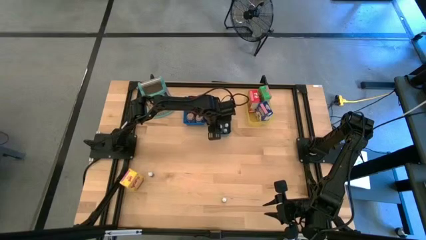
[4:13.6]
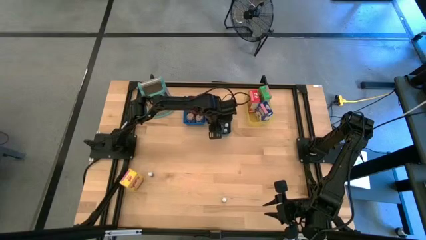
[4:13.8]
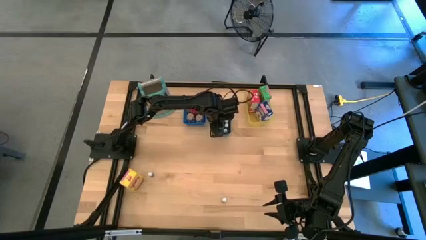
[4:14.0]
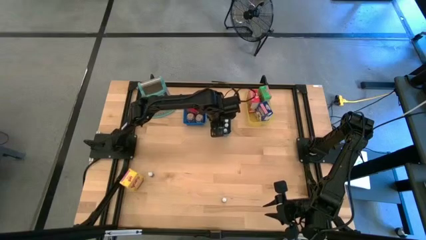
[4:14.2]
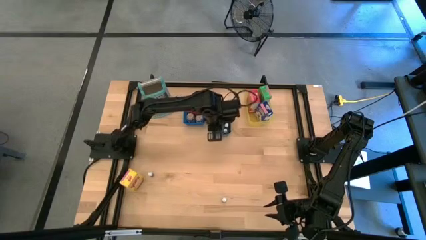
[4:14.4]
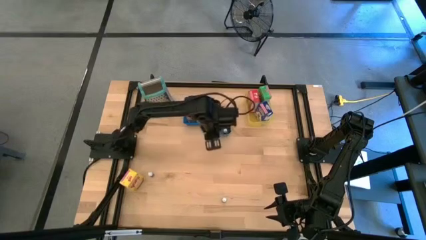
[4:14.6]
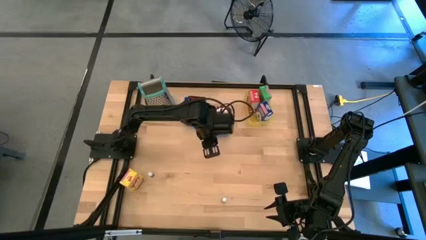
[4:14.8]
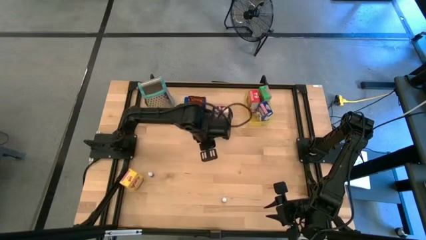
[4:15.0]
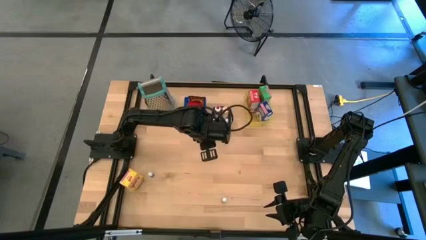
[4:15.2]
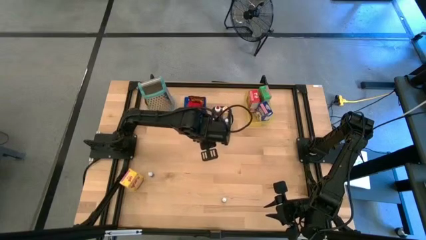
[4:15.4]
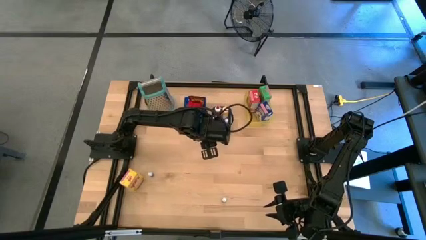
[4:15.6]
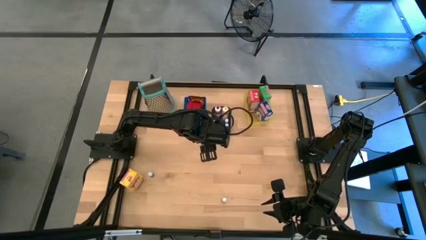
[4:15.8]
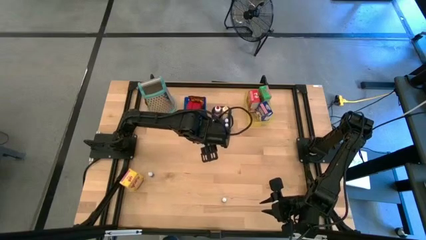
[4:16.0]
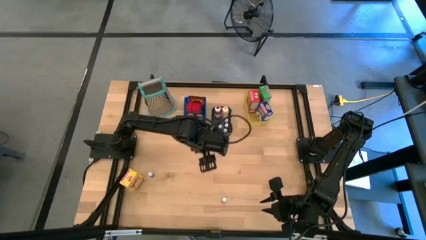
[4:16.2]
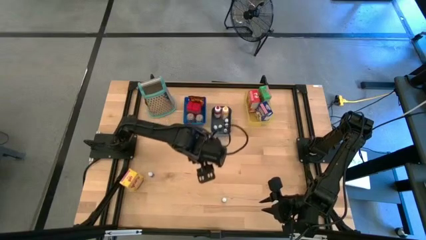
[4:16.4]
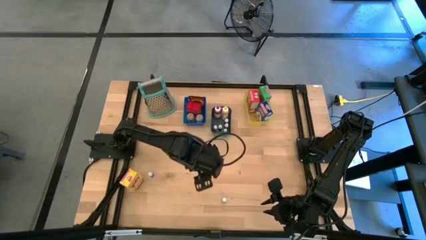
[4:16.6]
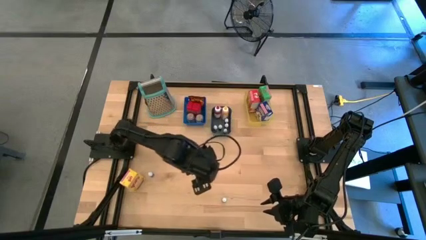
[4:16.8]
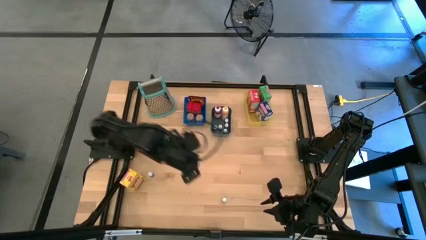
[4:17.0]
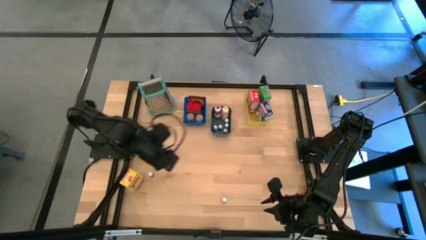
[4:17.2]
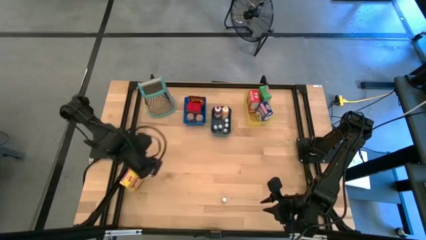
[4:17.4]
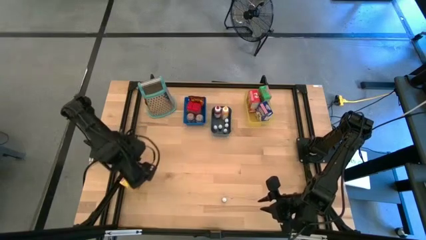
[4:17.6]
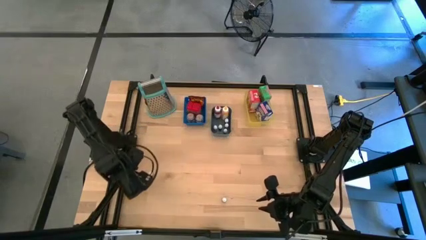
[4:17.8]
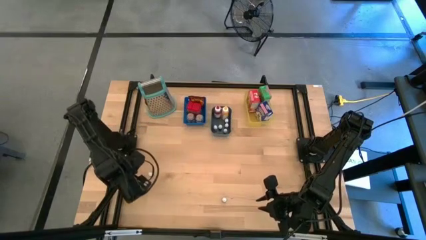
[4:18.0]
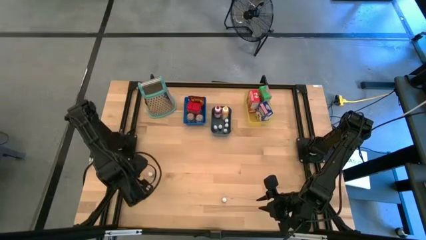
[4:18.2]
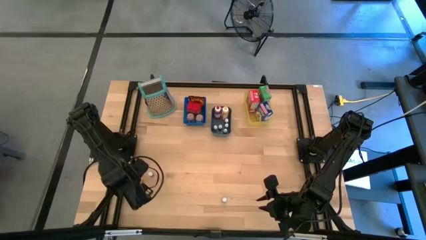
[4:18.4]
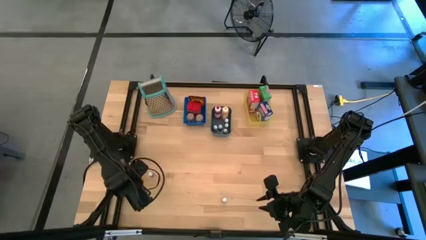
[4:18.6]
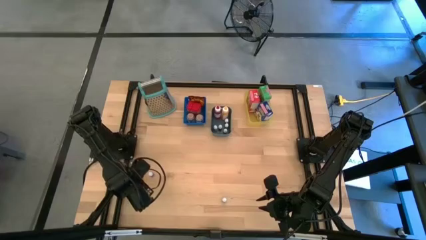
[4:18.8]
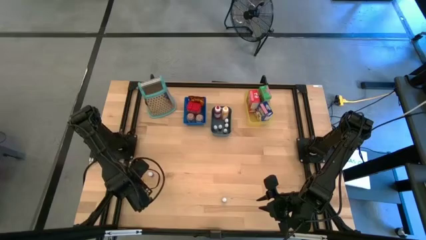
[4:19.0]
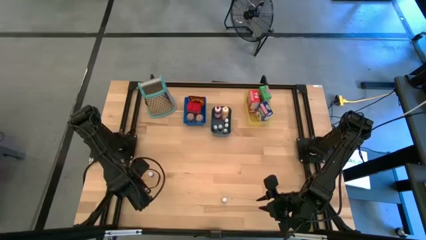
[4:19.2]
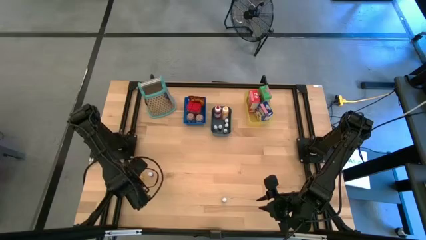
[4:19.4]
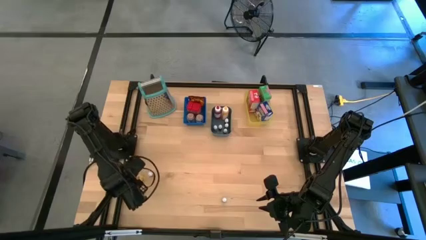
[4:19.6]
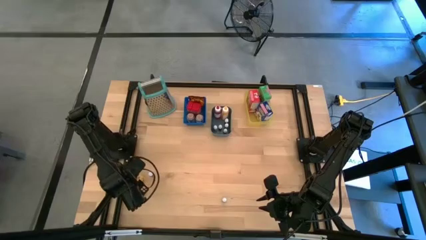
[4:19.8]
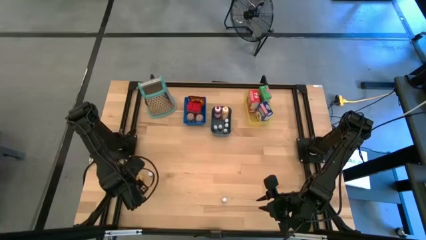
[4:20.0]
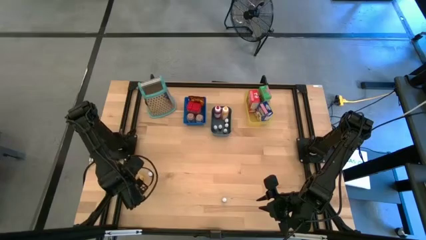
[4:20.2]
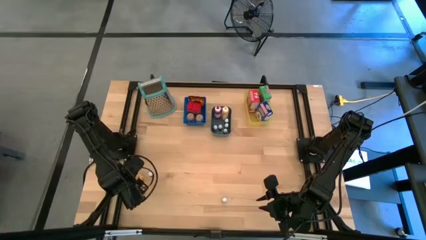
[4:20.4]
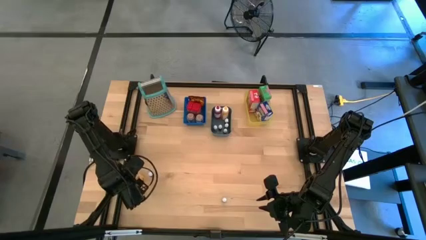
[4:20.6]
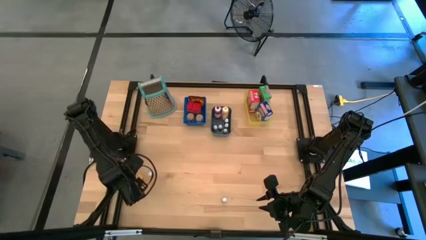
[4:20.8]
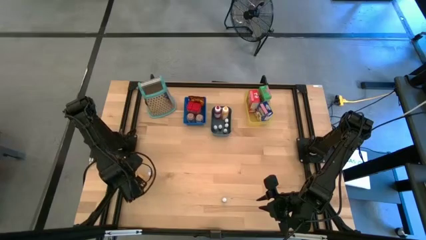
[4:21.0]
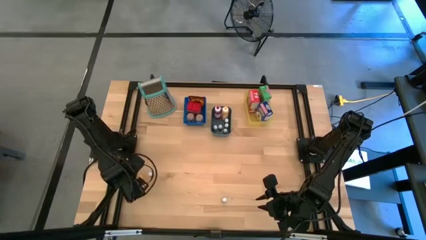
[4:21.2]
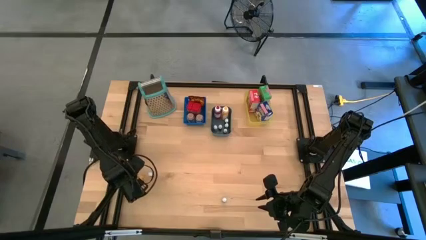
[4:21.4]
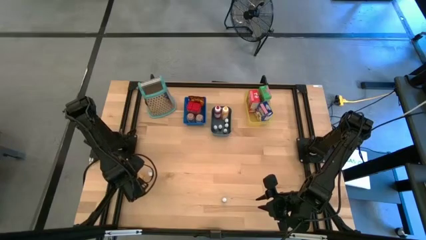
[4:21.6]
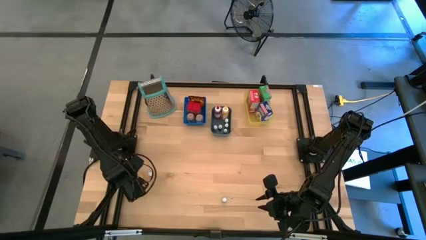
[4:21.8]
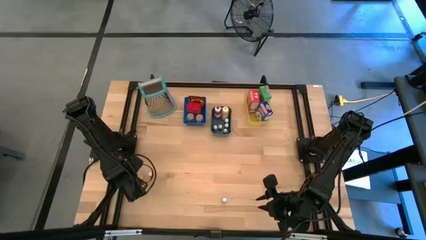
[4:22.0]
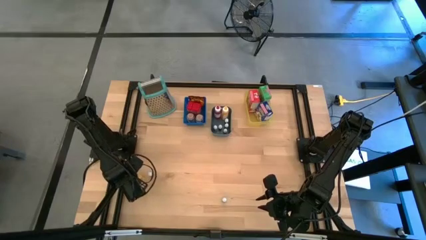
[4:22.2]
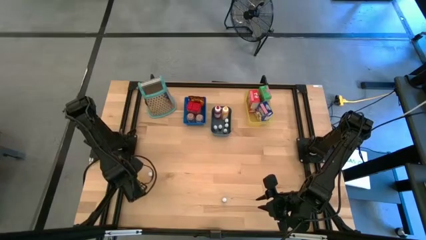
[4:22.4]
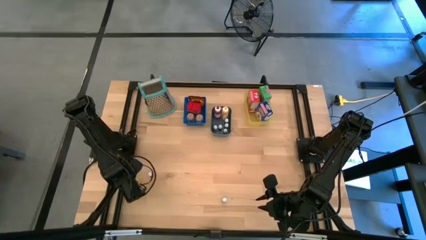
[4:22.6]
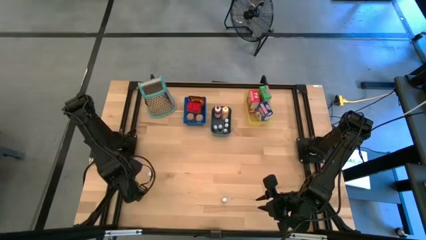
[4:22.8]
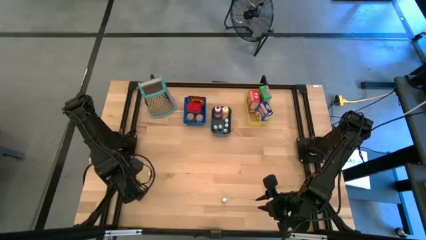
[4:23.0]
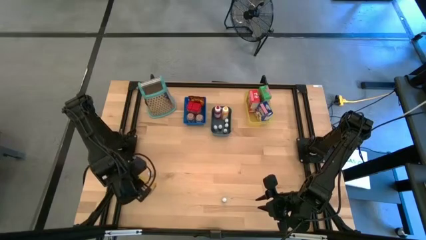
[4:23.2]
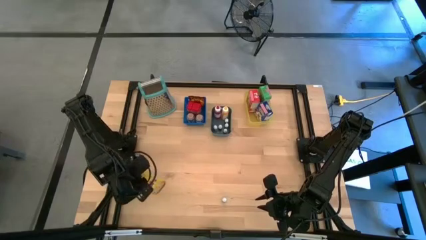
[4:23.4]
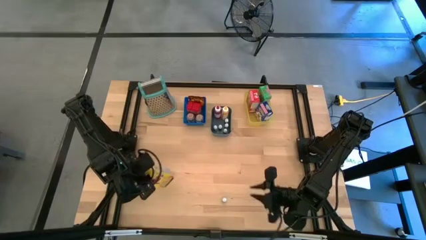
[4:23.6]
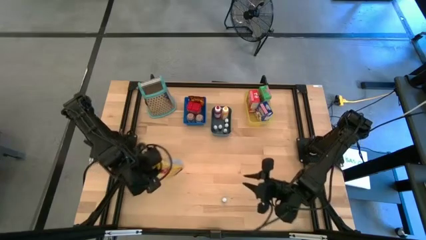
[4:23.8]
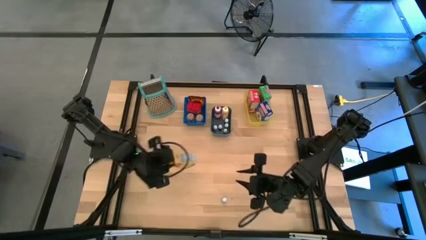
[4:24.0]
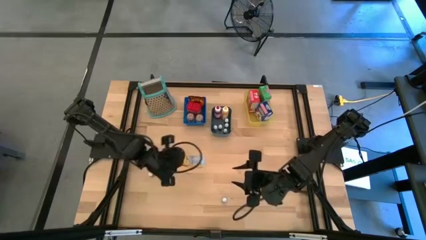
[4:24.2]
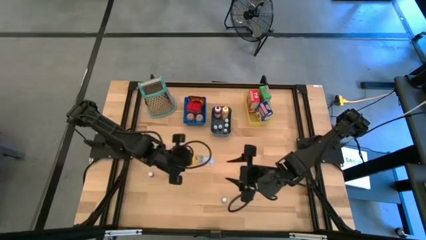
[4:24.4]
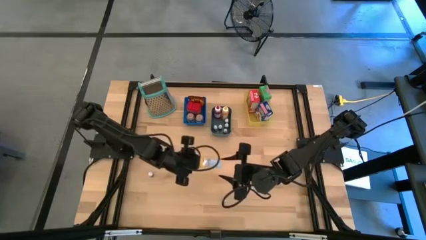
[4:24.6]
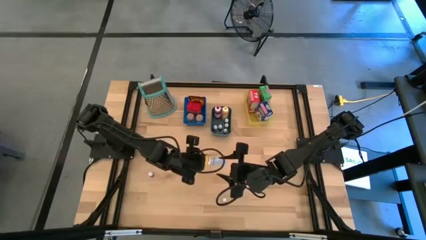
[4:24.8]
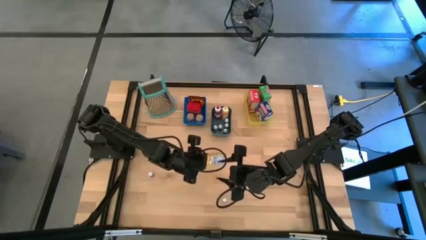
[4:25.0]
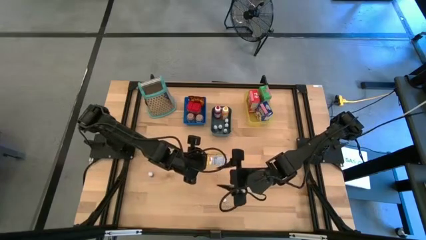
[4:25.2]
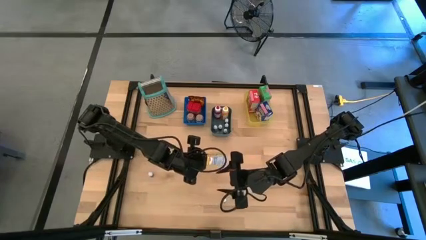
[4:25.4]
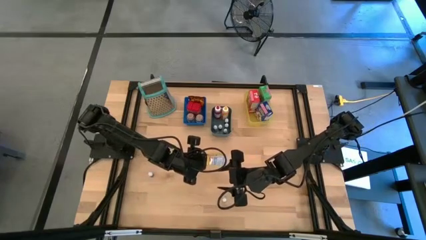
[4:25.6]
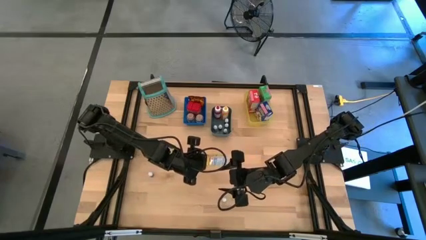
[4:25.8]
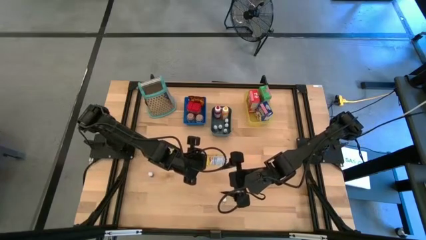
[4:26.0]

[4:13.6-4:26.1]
Task: Pick & Place Kitchen Items
Put the yellow cereal box into the yellow bin

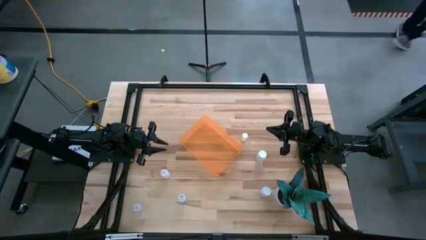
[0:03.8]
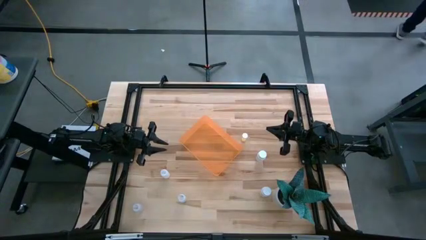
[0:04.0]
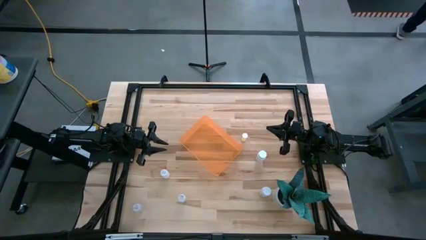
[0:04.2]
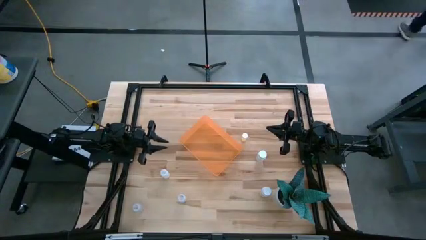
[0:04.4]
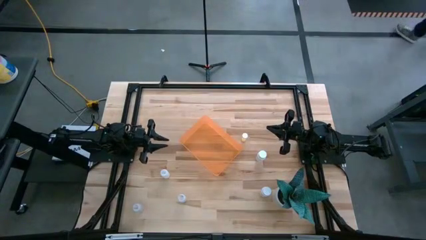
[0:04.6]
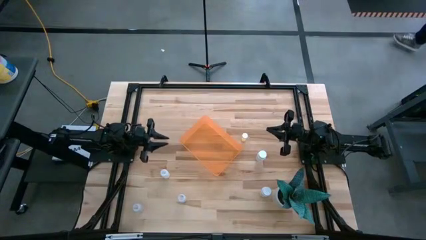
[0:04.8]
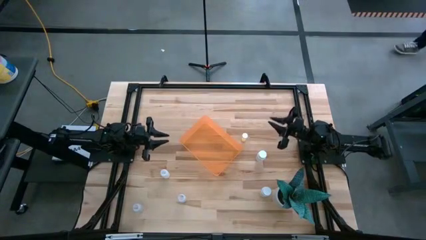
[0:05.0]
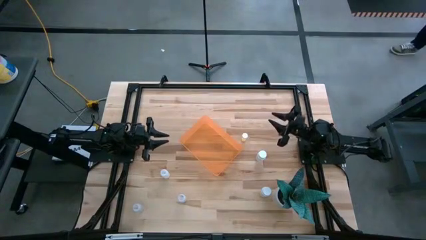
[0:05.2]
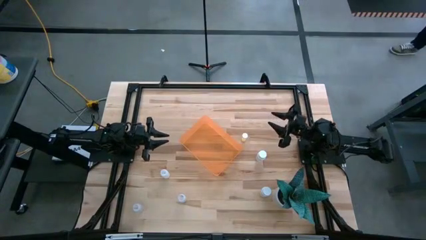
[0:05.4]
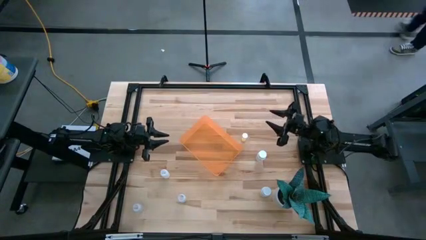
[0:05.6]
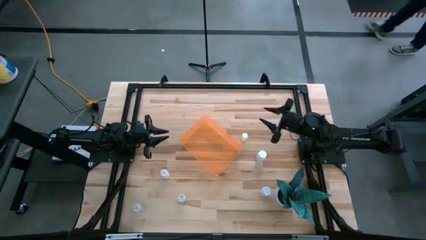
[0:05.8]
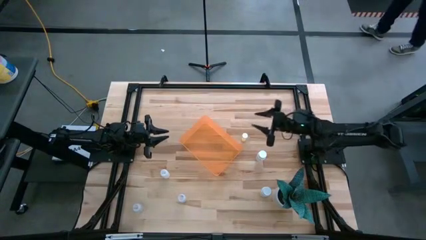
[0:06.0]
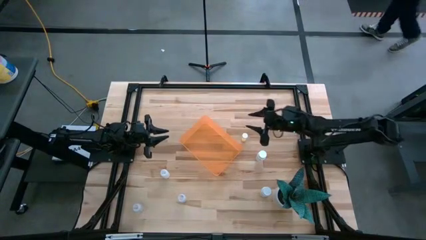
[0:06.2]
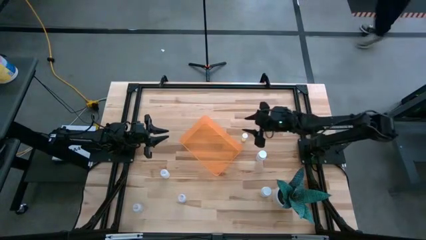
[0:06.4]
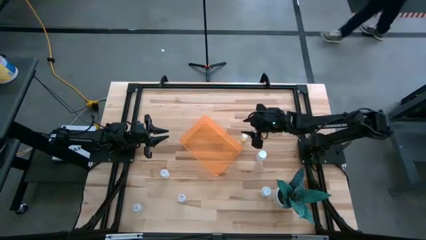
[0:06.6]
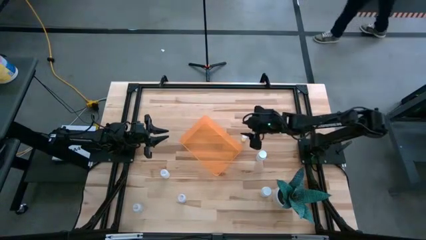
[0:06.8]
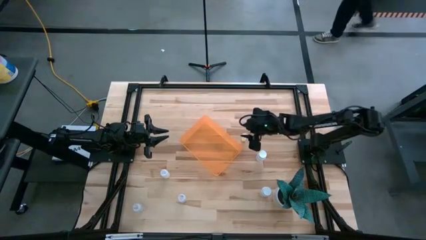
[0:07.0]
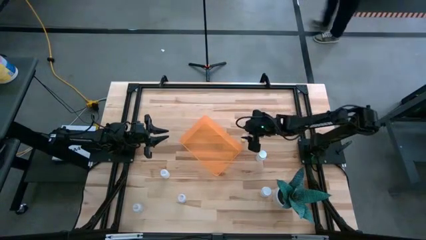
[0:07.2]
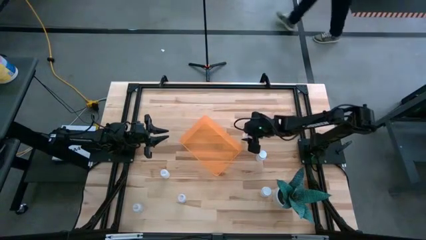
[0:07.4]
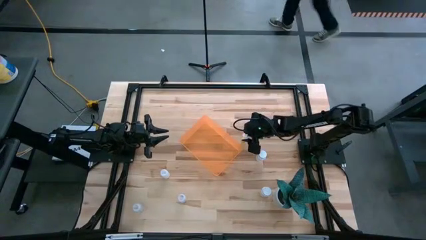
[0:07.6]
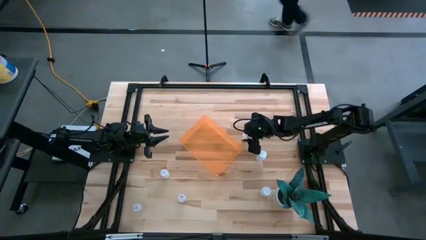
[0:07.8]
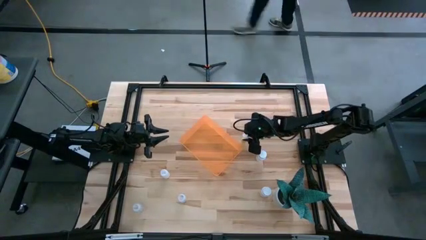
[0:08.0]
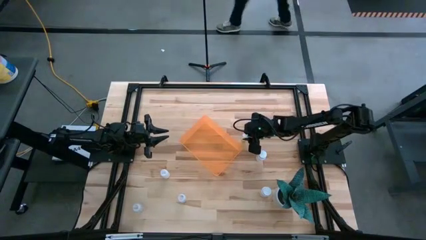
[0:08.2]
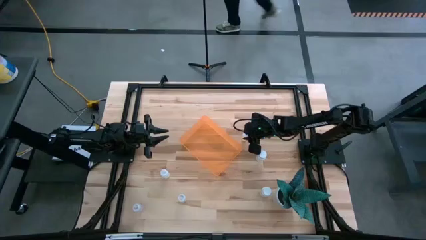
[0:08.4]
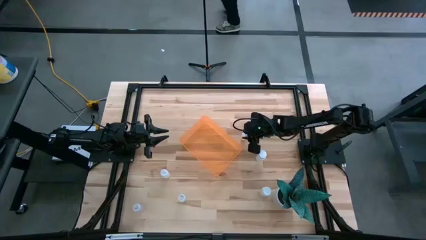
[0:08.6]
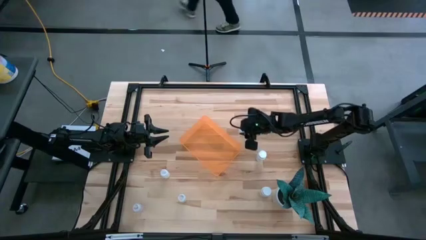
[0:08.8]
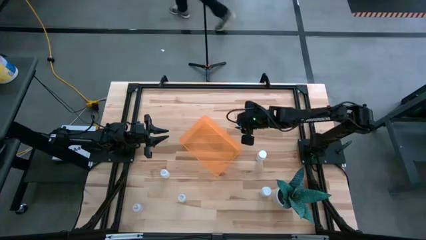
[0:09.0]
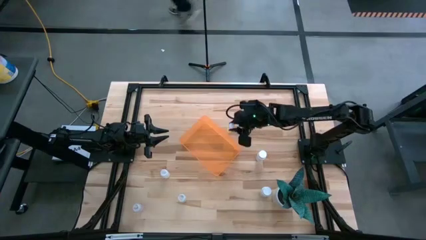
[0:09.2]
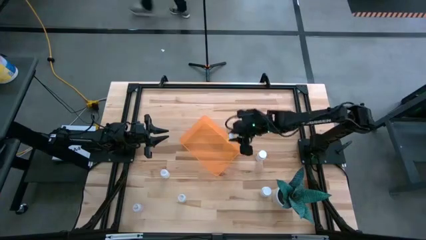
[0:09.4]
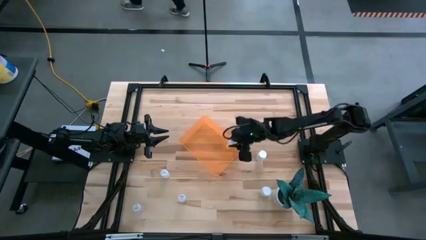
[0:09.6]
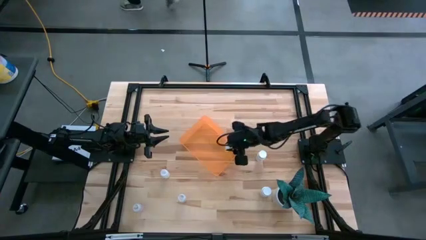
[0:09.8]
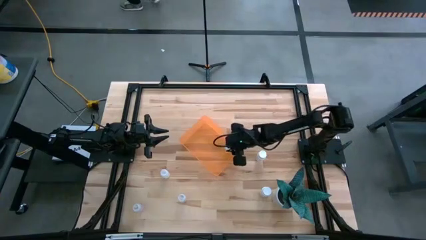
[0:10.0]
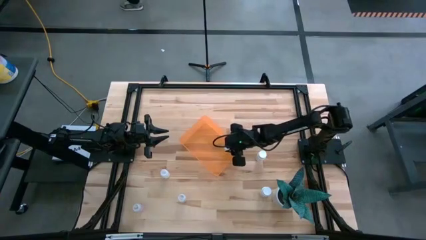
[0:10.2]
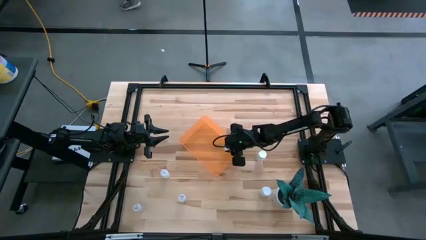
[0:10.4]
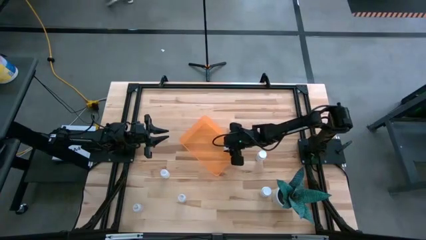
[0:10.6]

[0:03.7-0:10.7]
Task: Pick and place pill bottles into a basket
Put the yellow pill bottle into the orange bin
